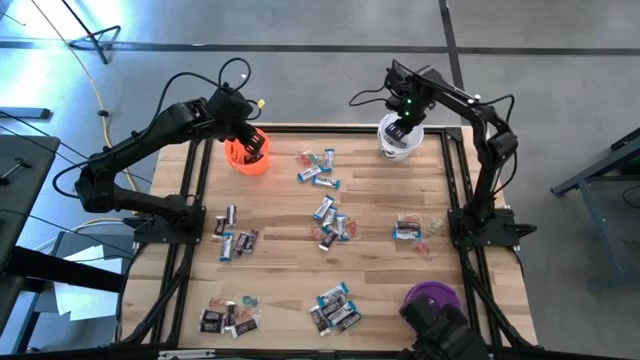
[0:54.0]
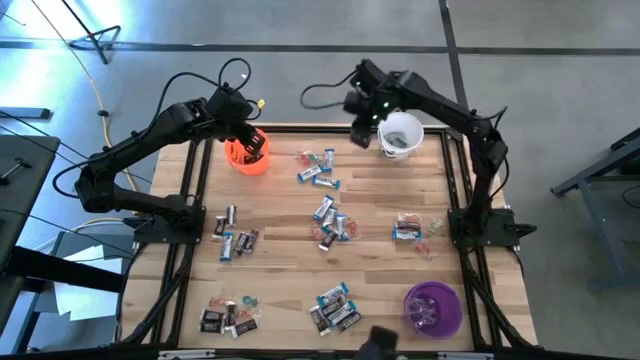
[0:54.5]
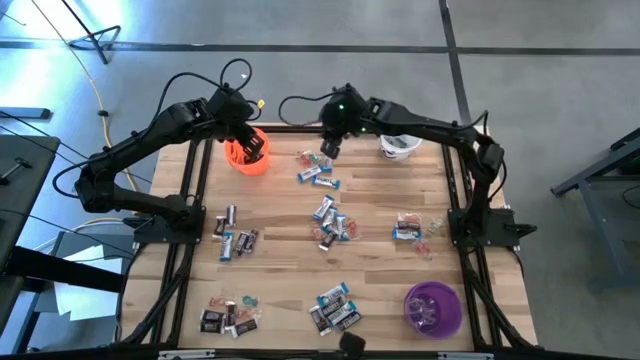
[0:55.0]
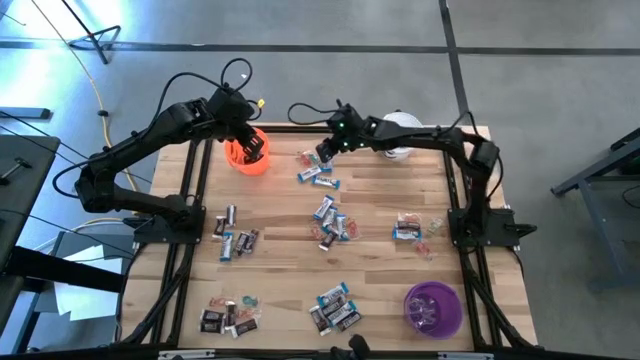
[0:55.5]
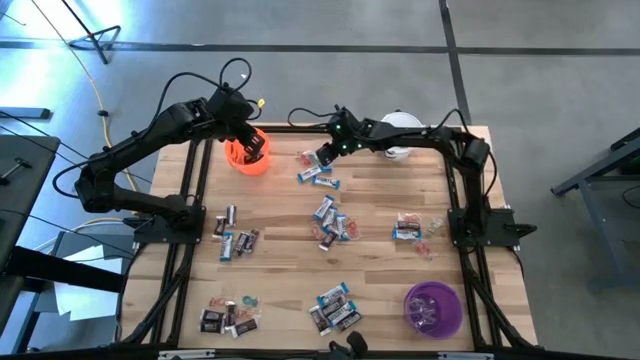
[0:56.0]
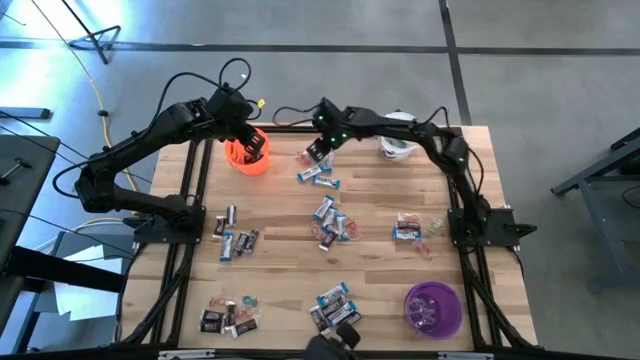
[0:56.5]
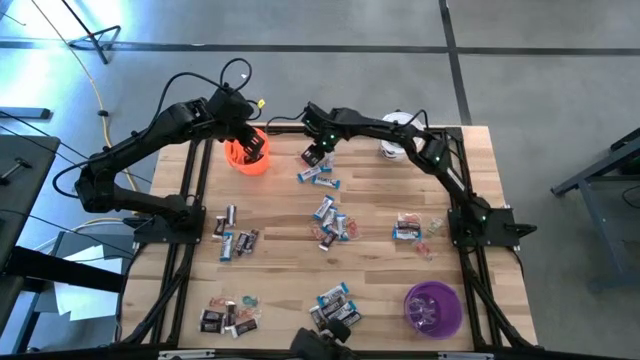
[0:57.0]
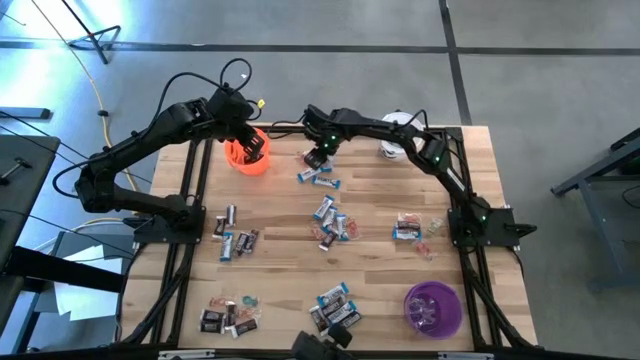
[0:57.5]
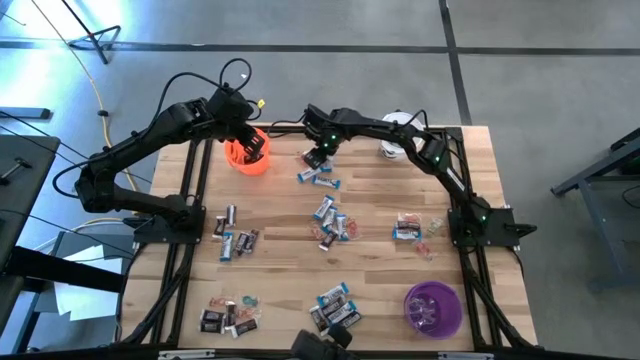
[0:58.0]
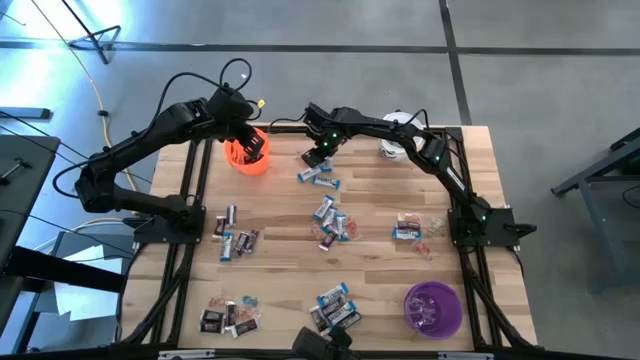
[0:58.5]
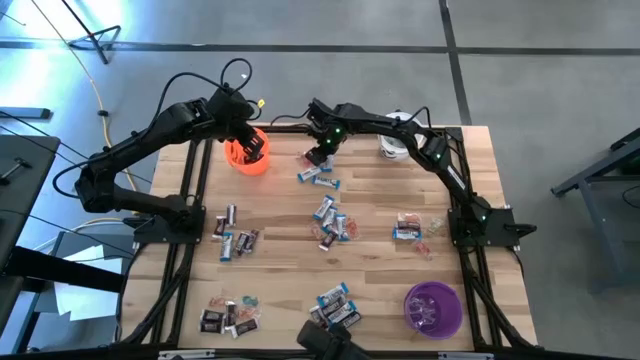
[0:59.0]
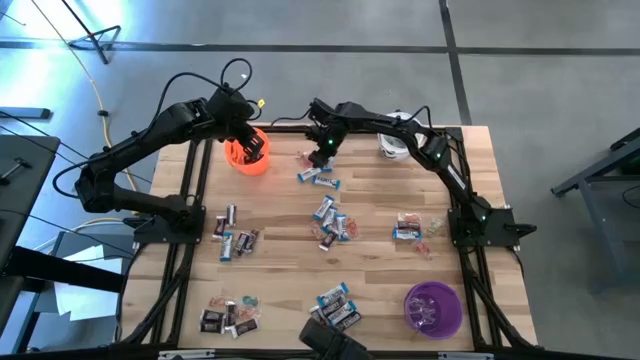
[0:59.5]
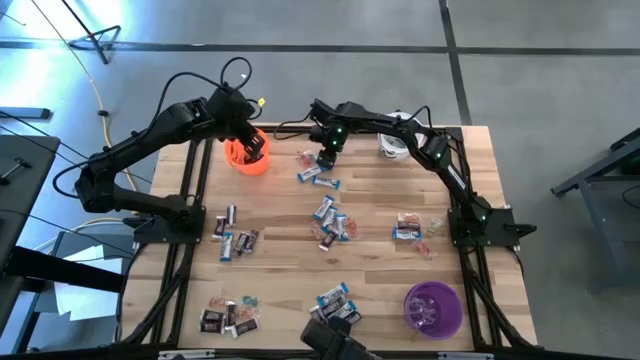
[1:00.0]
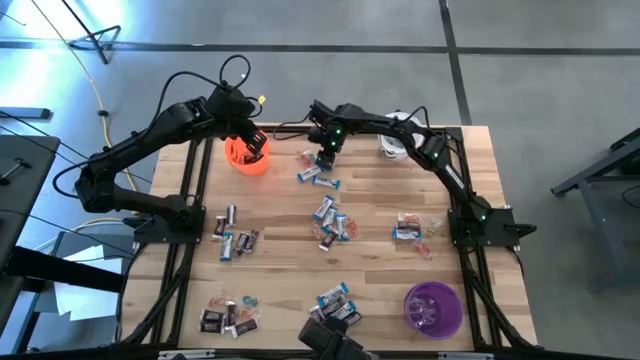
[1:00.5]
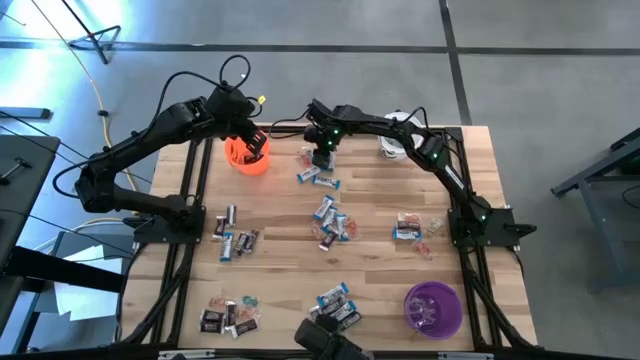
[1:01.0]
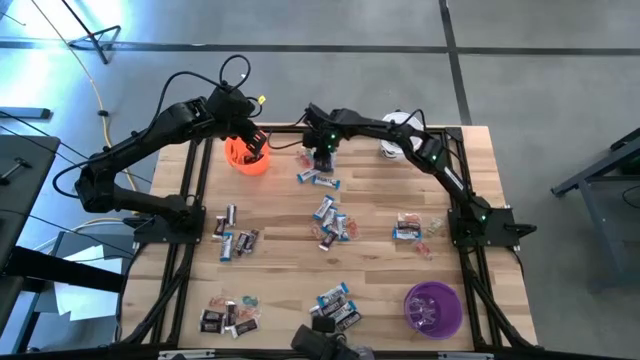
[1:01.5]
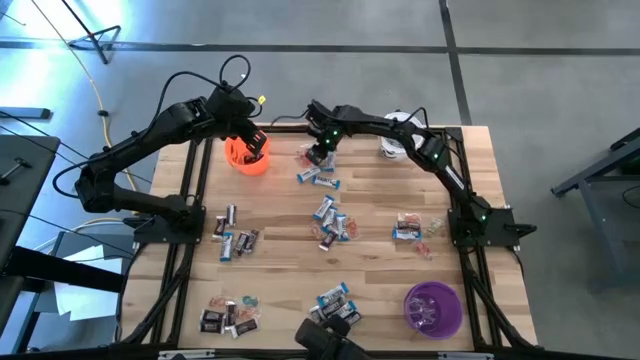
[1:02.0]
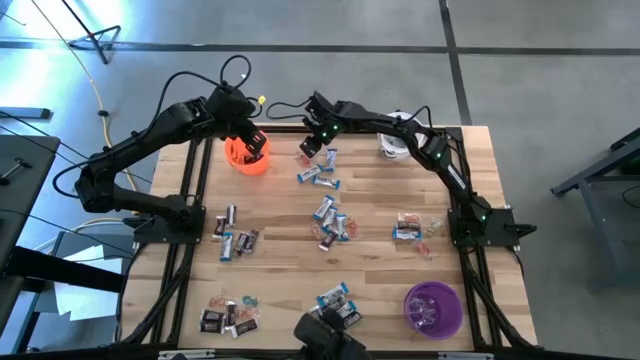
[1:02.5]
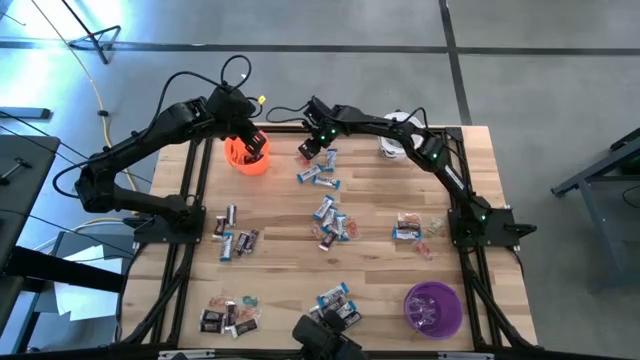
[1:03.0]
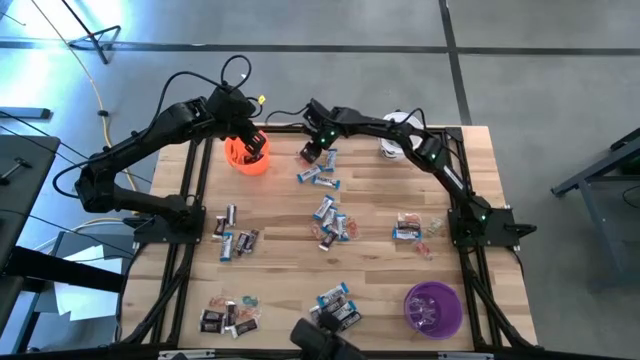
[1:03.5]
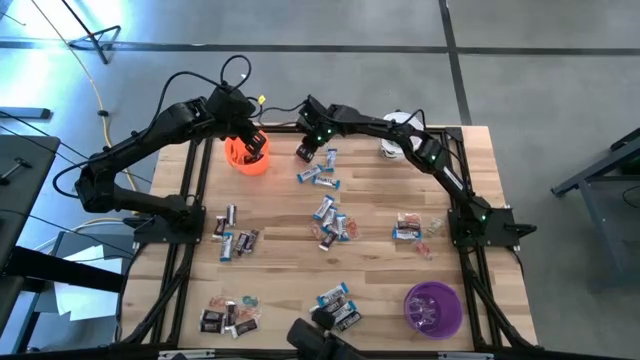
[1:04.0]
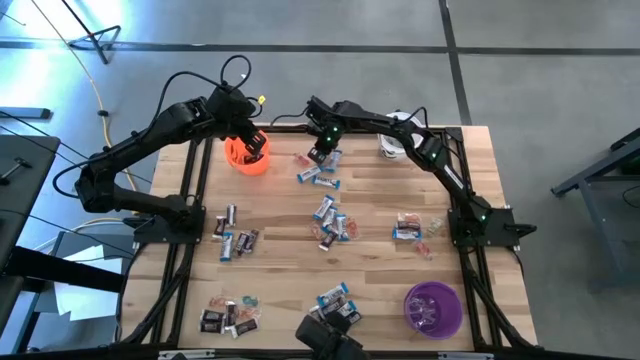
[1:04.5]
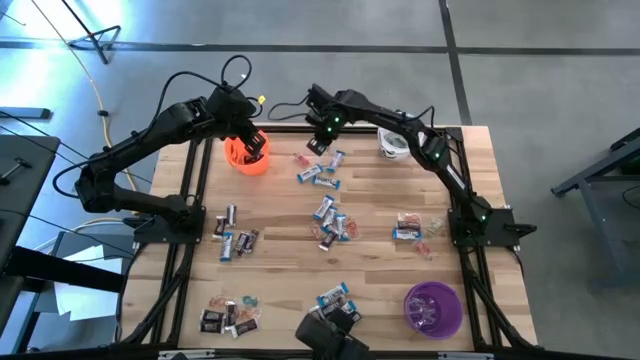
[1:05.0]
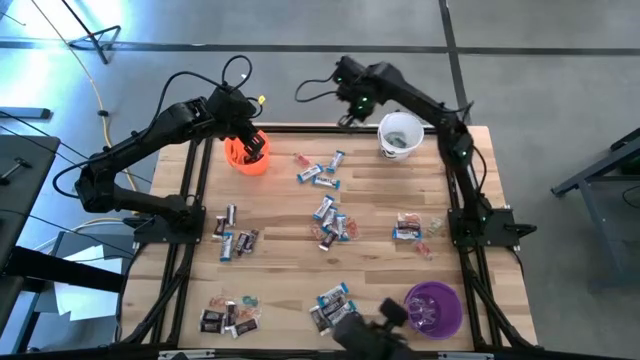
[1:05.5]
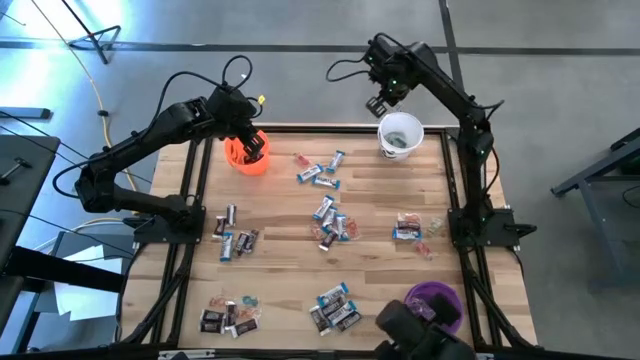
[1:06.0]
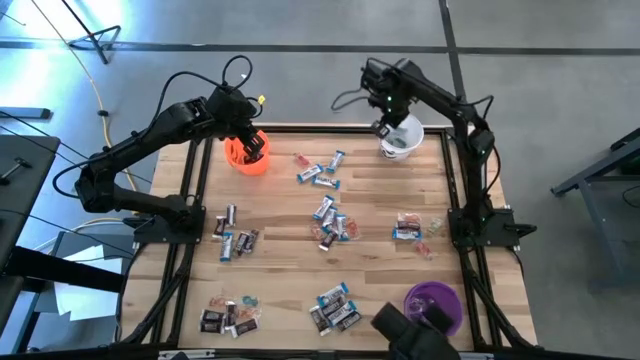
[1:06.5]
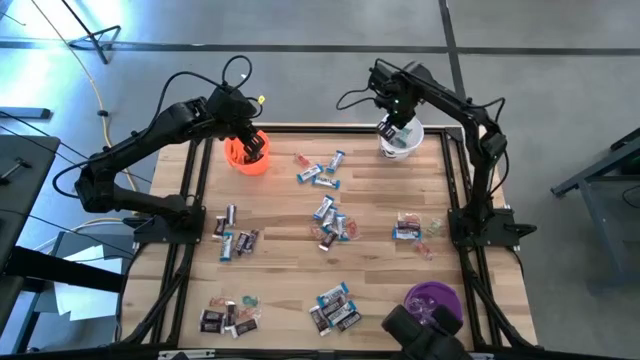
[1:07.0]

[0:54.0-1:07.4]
Task: Sort candy
Put the blue gummy into the white bucket

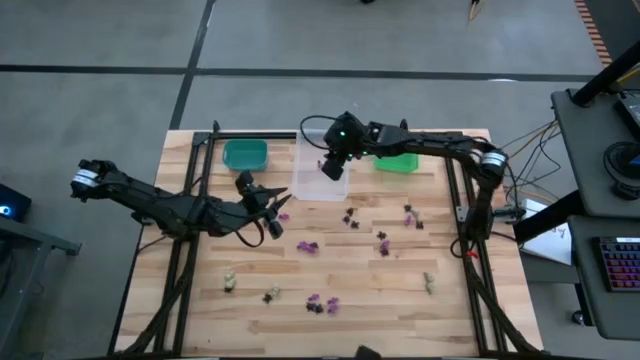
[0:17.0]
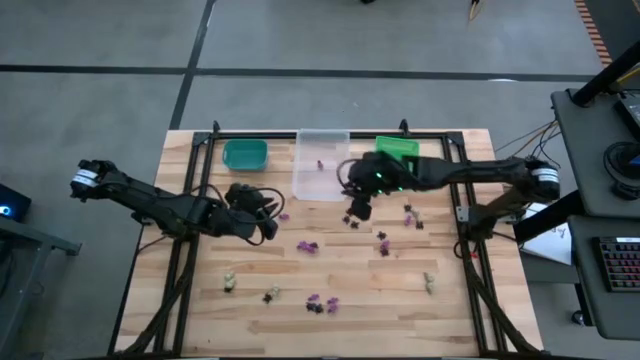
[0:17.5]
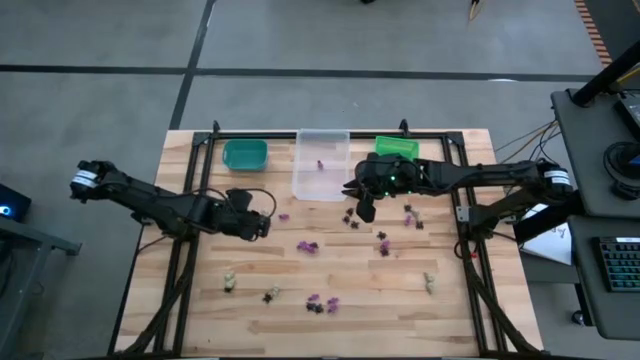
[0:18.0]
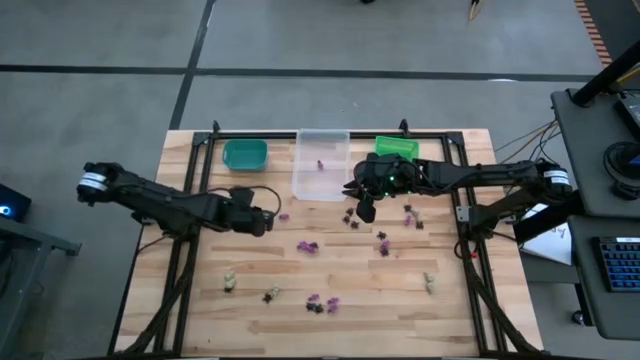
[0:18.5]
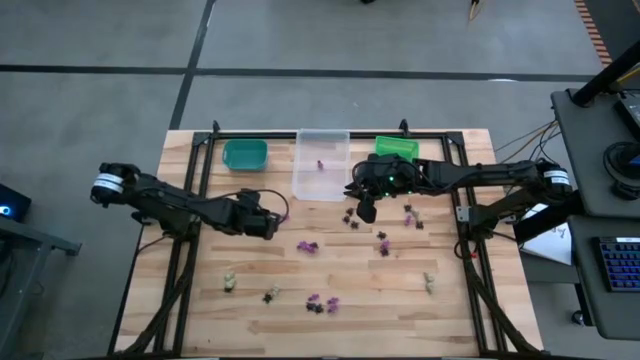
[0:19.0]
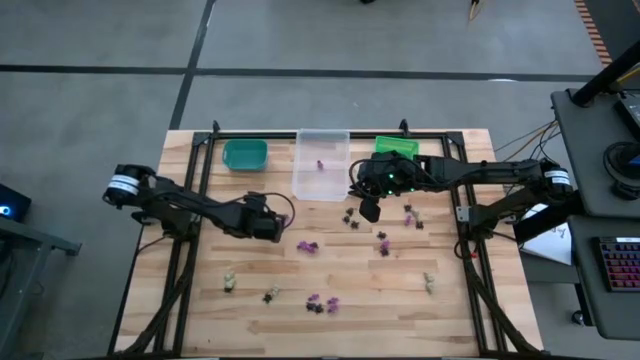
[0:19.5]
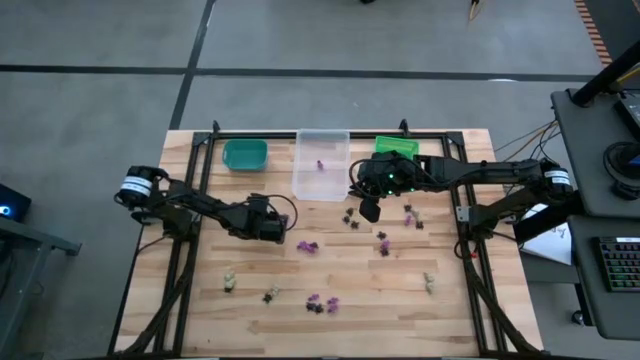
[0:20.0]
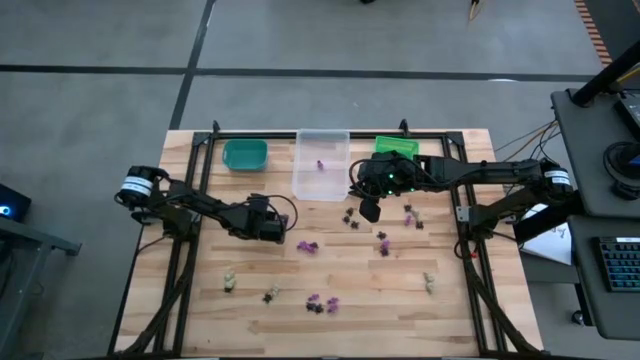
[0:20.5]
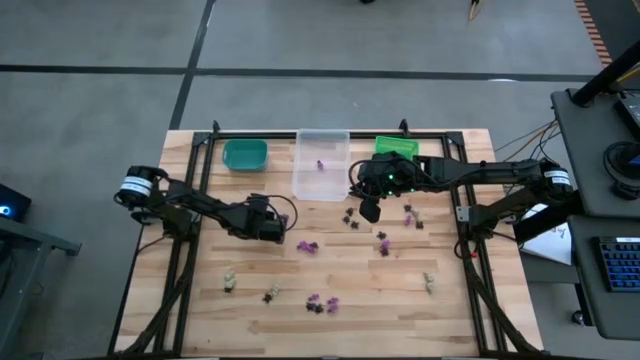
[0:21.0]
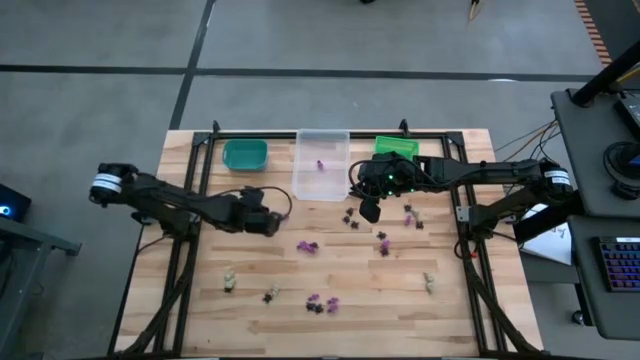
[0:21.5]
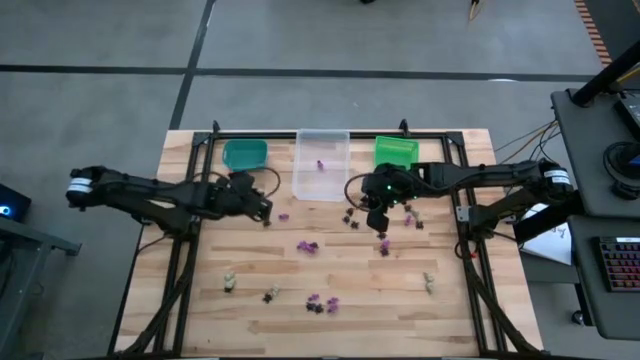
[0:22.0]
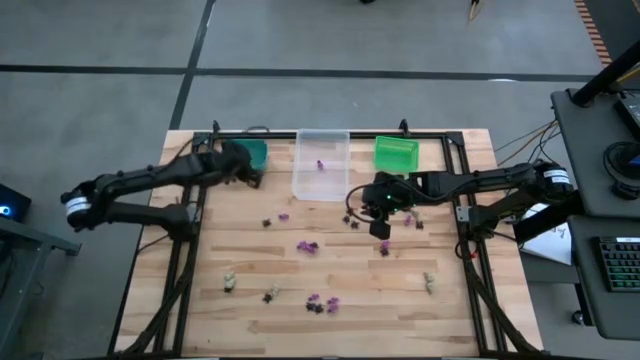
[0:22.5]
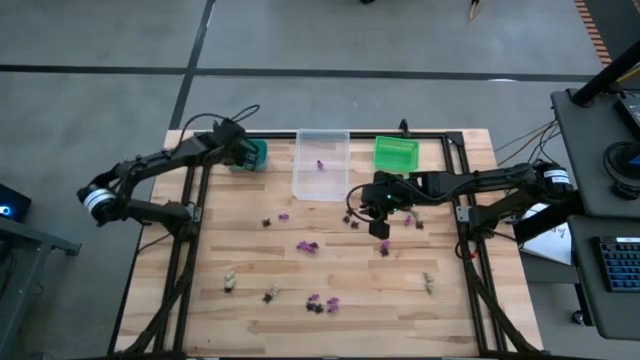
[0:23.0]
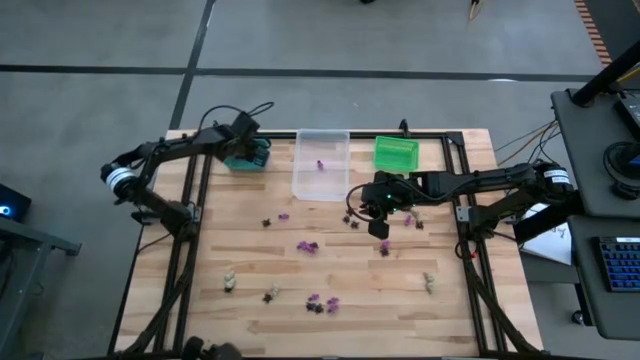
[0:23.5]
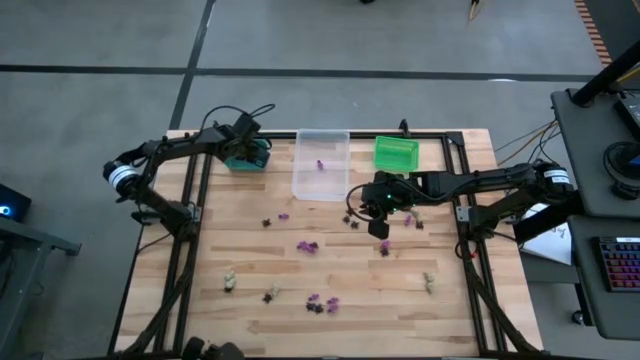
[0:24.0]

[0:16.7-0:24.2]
Task: Sort Halloween decoration
Put the white skull toy into the light blue bin
